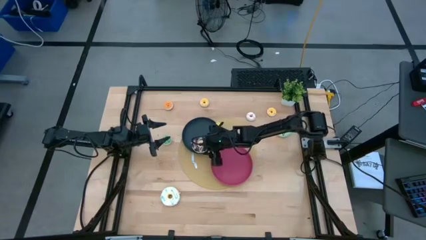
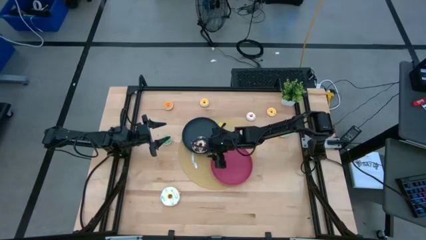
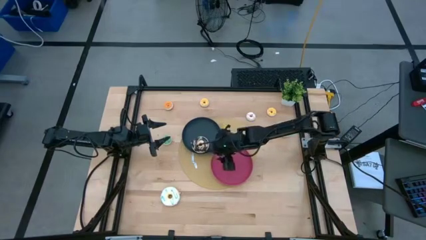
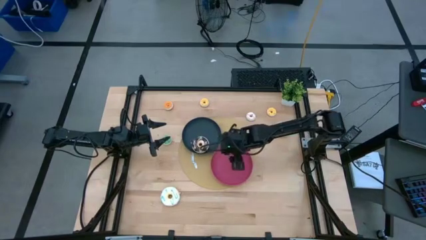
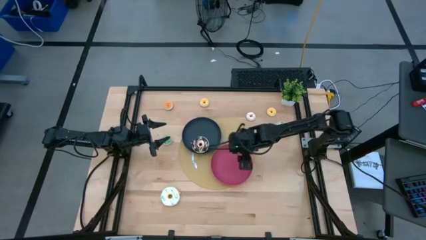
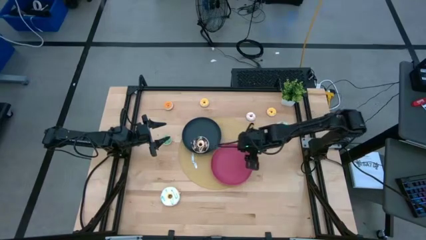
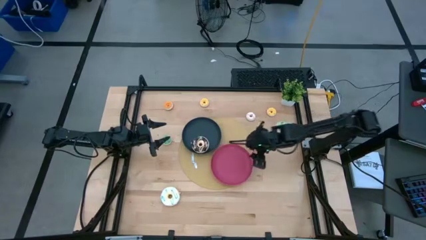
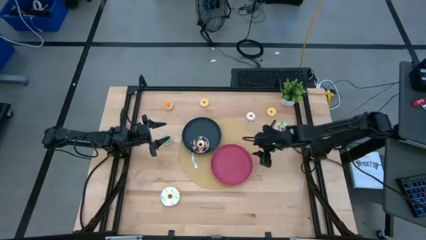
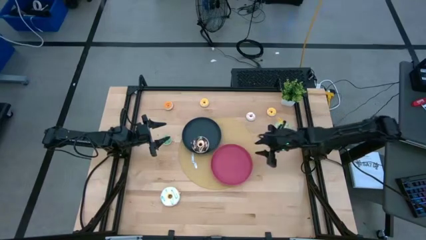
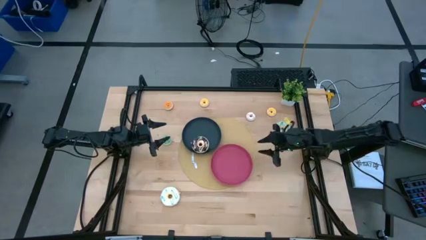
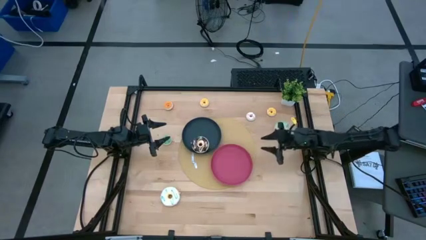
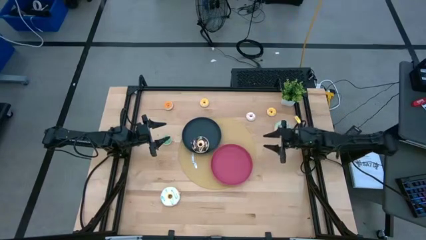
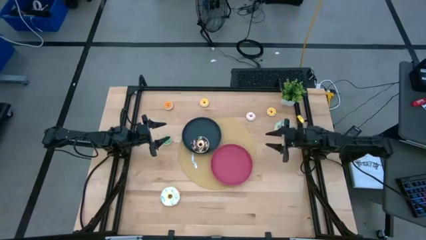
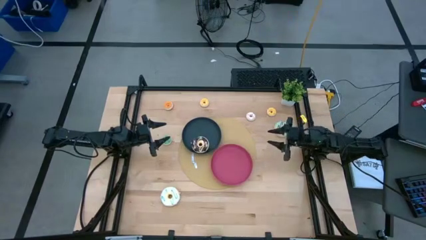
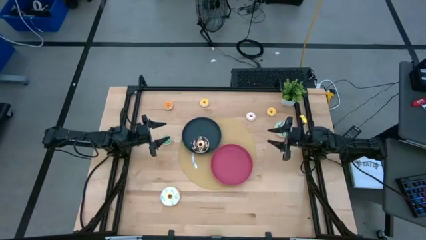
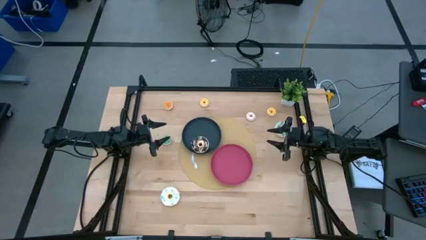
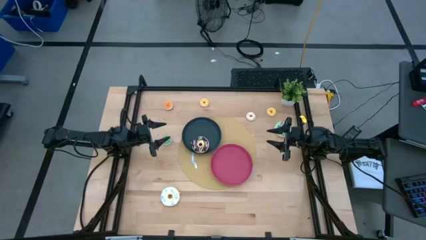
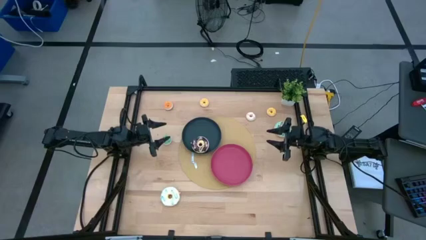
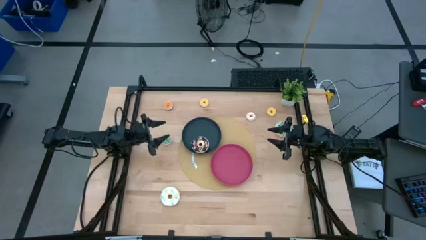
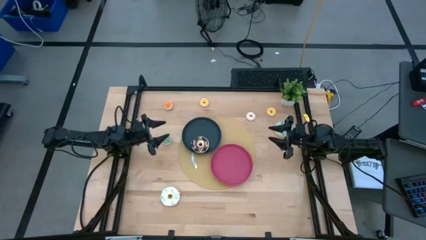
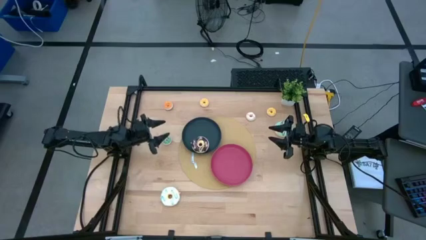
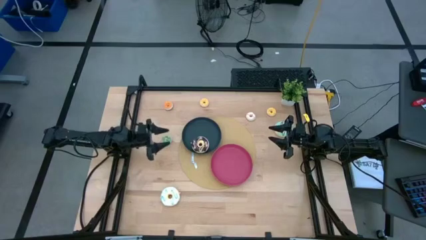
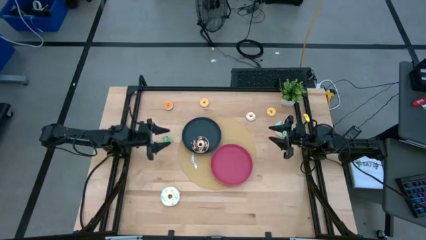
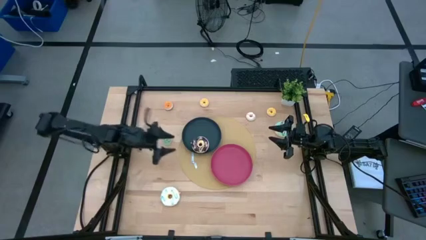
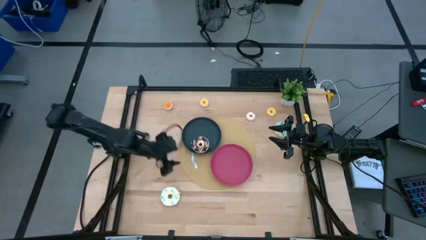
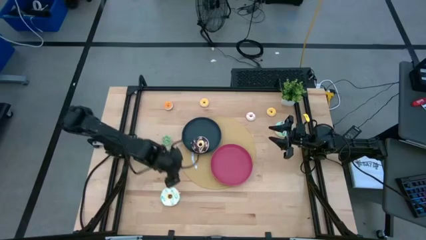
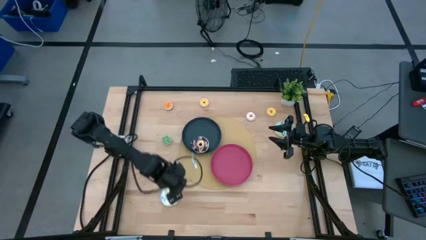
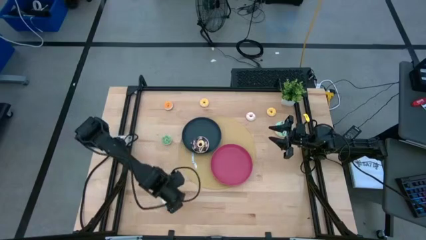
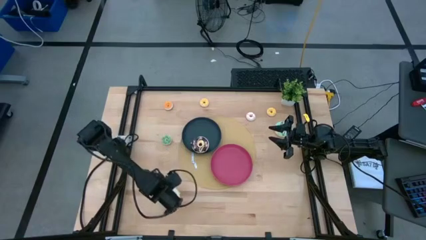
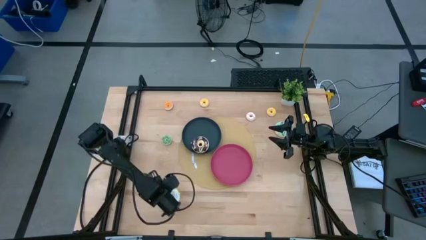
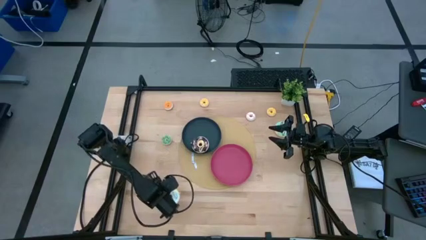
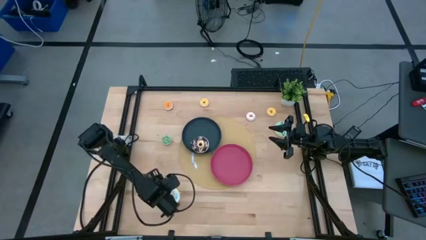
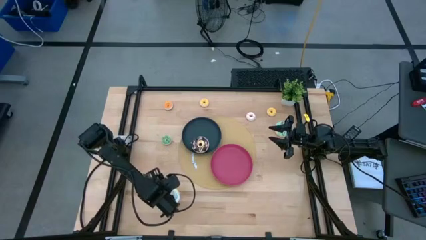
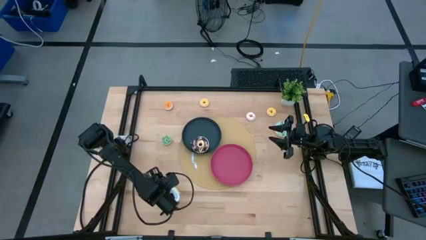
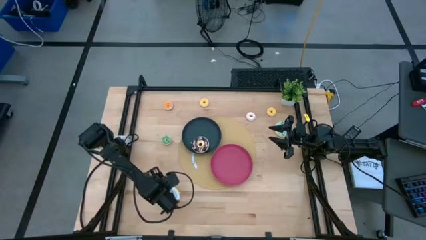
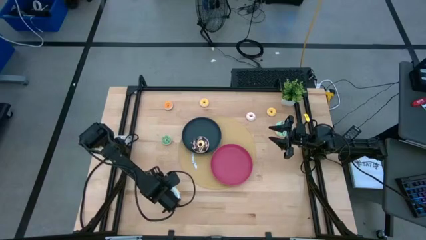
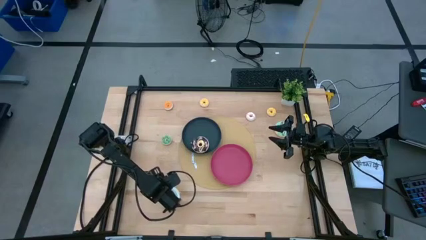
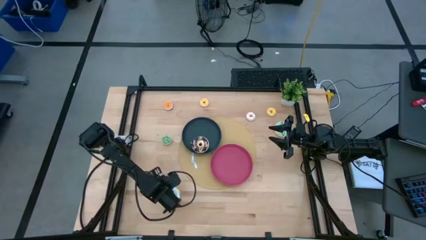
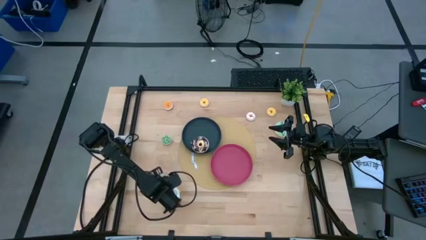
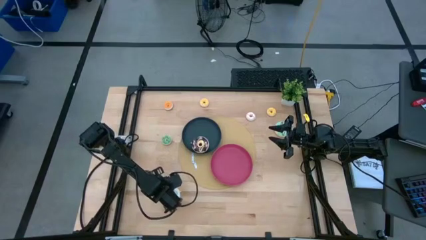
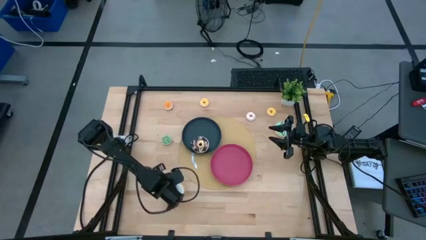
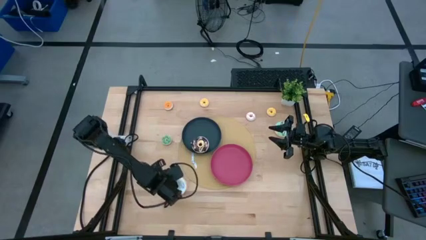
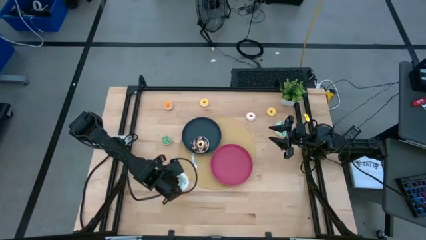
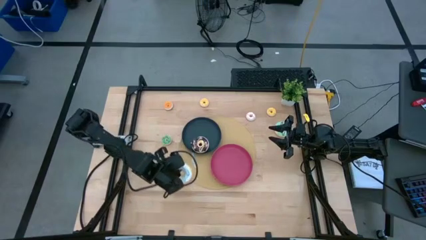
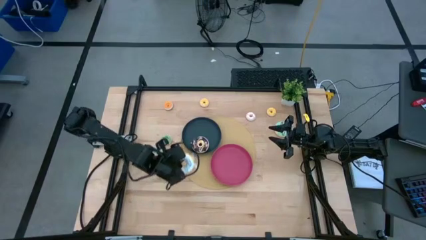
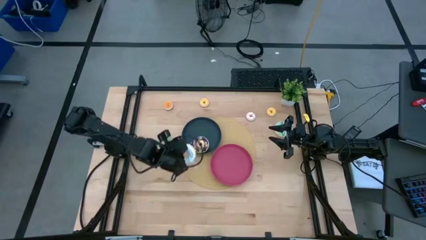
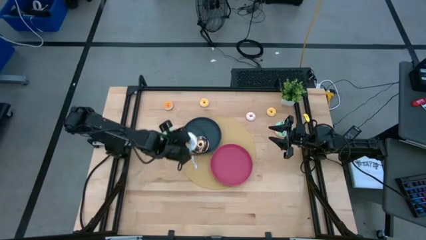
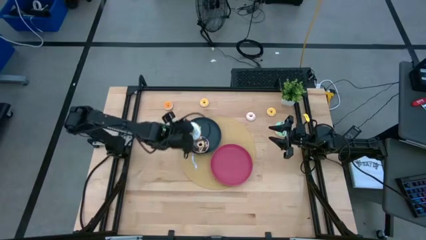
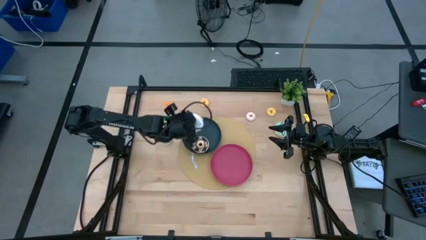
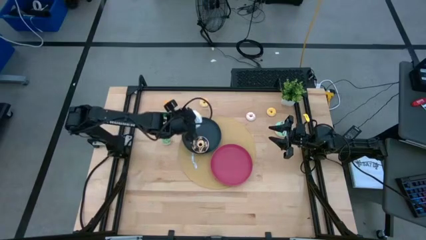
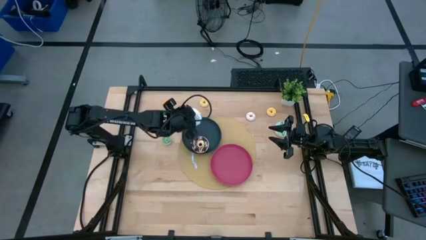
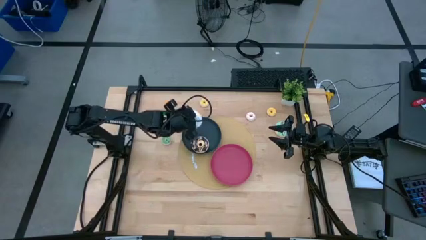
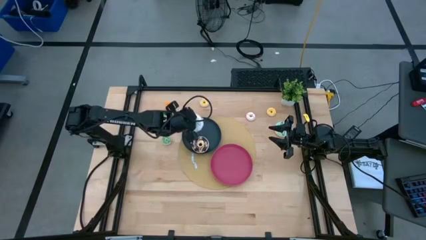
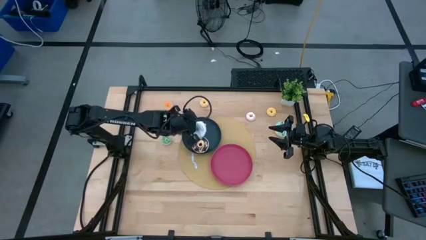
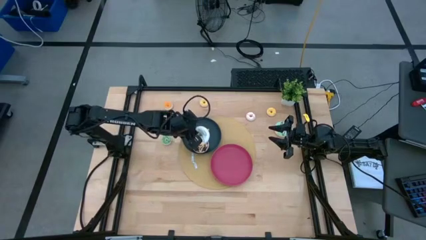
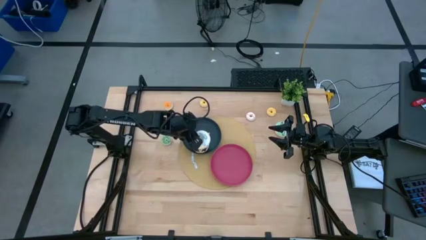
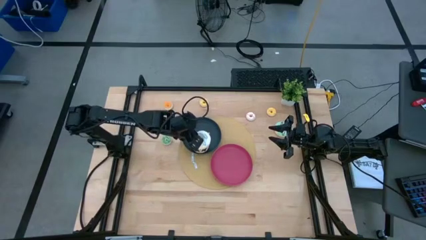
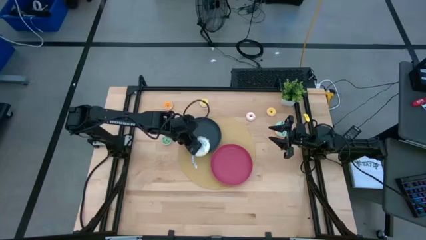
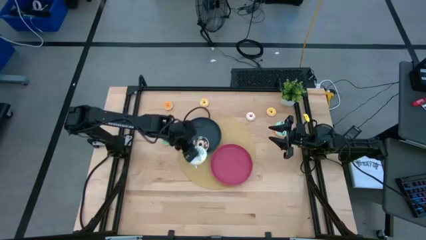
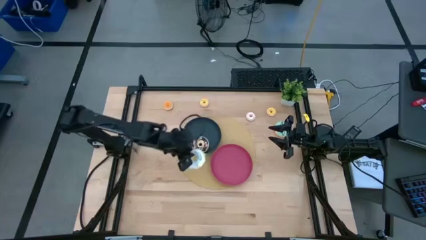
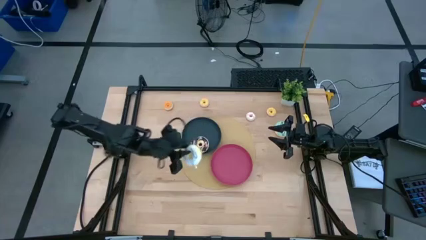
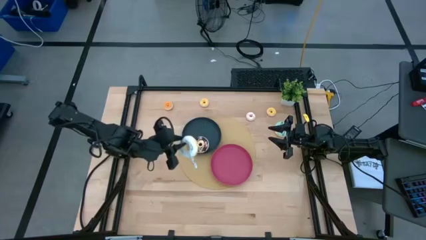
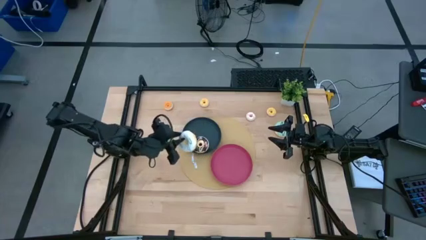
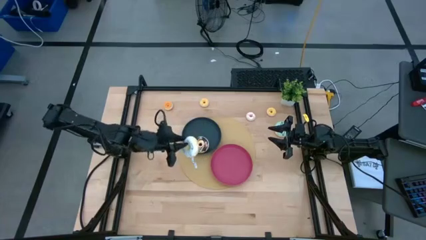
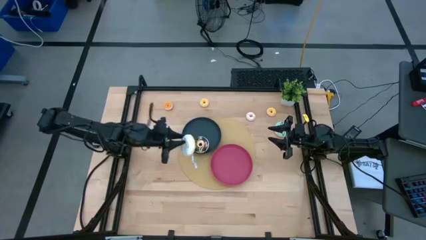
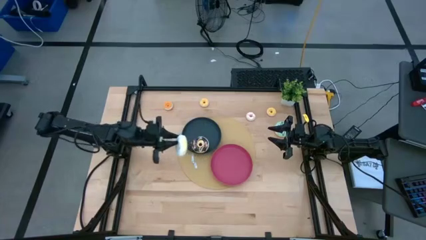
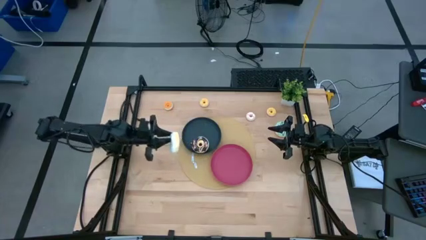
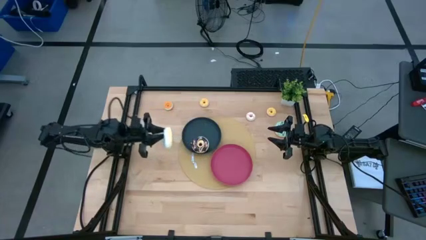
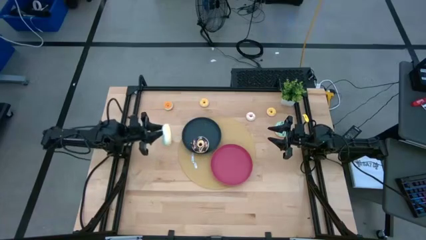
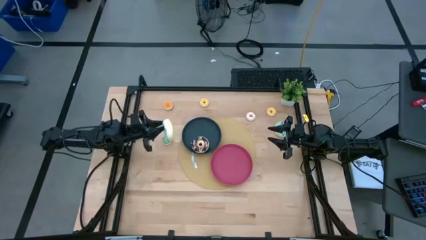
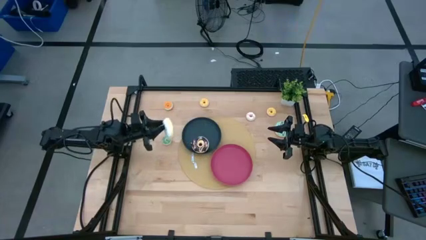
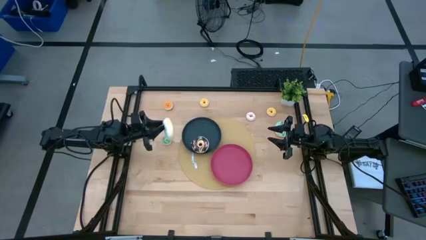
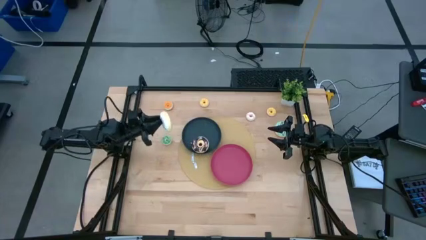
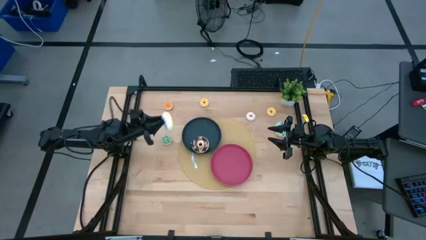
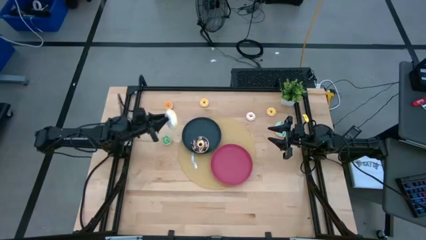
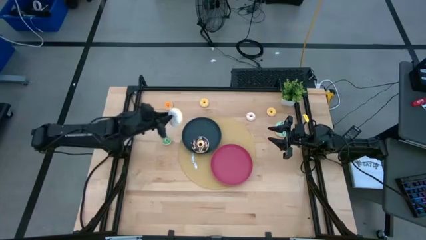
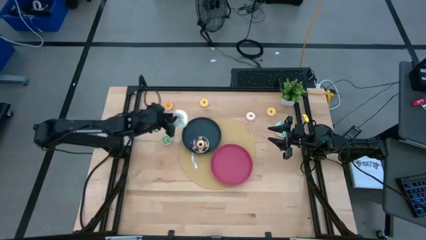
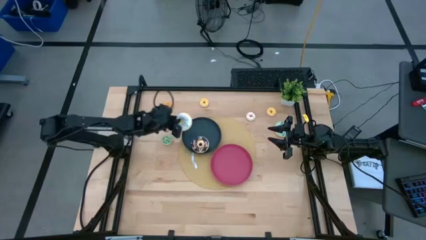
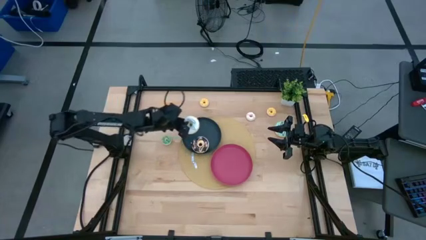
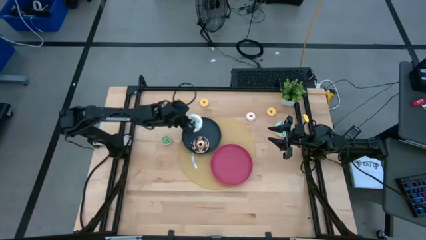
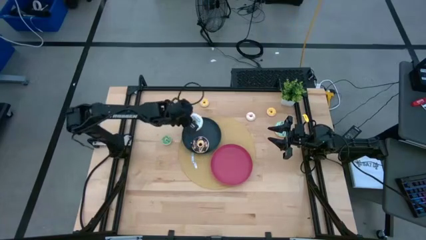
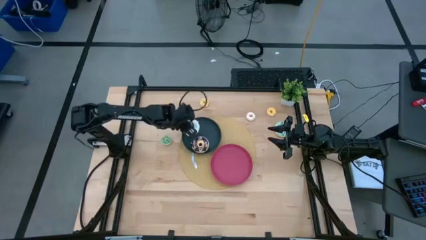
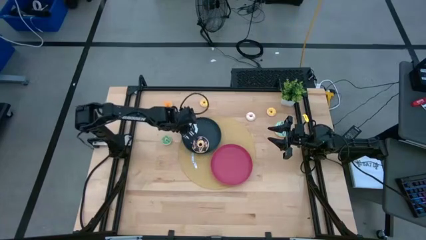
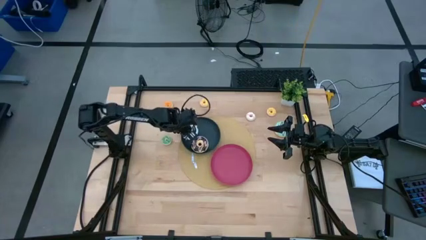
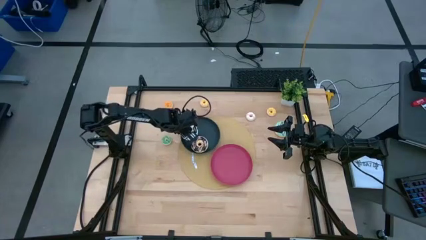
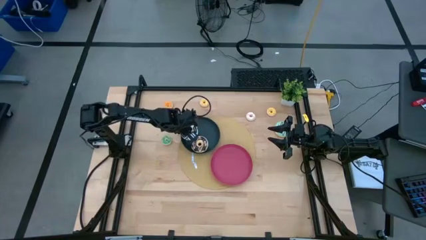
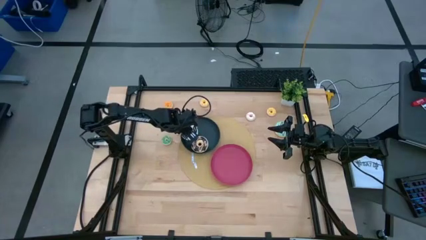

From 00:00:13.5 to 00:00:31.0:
Task: Pick & Place donuts
Put the large white donut on the black plate
